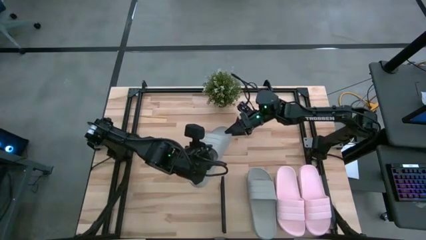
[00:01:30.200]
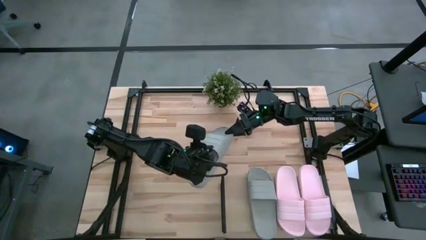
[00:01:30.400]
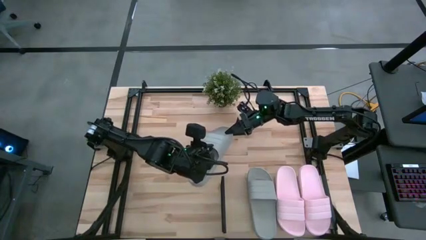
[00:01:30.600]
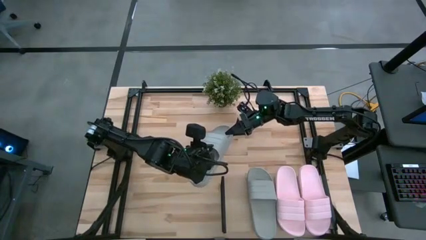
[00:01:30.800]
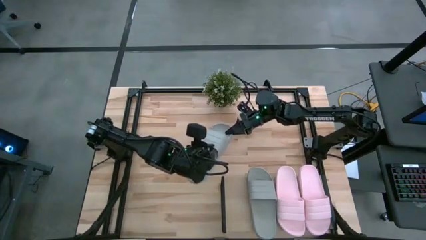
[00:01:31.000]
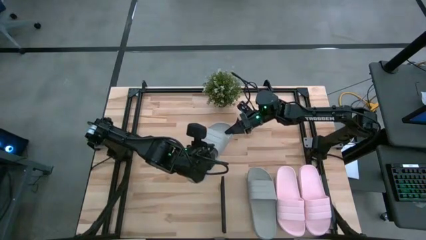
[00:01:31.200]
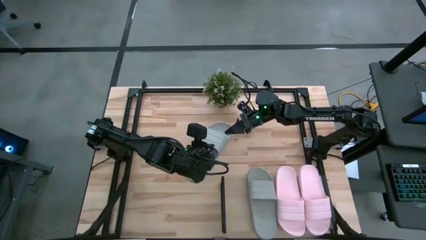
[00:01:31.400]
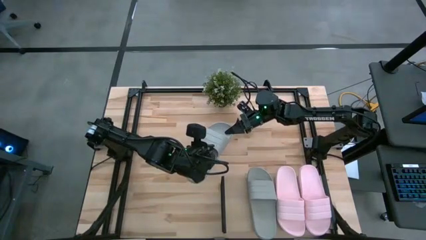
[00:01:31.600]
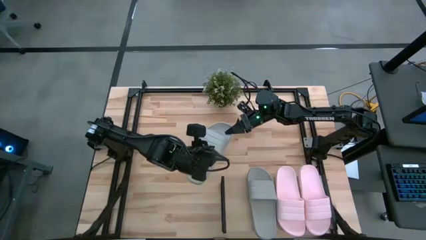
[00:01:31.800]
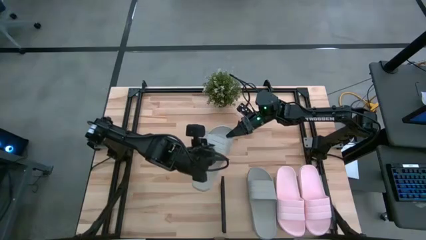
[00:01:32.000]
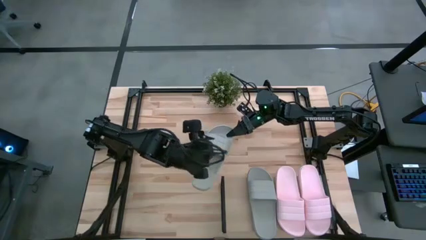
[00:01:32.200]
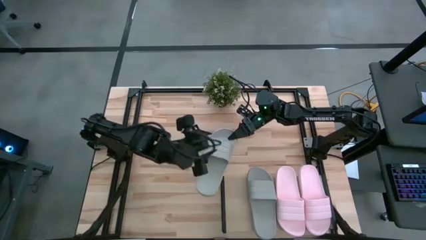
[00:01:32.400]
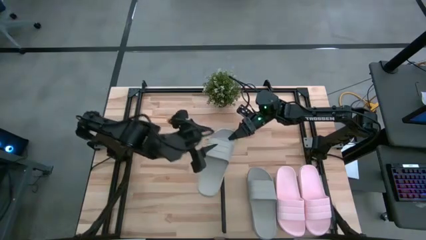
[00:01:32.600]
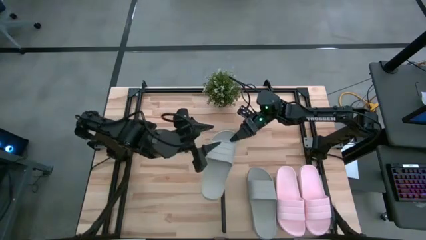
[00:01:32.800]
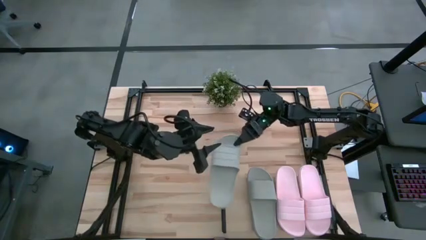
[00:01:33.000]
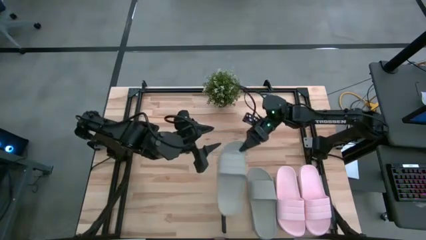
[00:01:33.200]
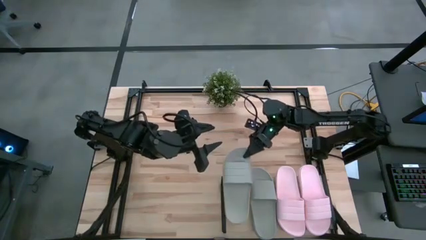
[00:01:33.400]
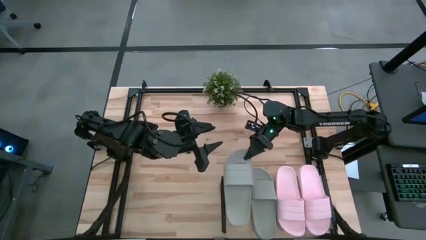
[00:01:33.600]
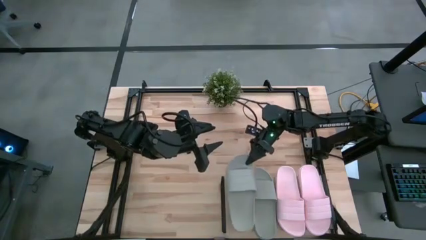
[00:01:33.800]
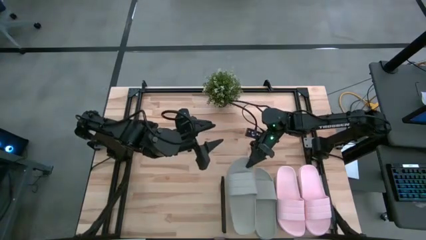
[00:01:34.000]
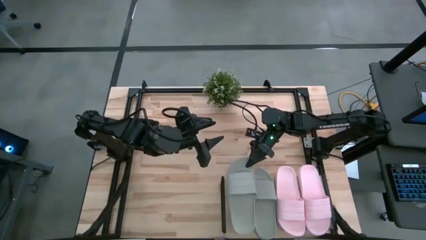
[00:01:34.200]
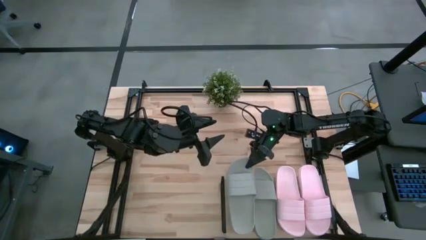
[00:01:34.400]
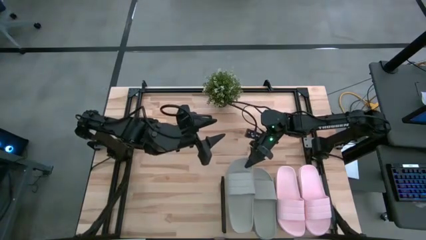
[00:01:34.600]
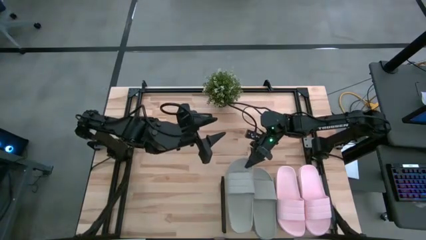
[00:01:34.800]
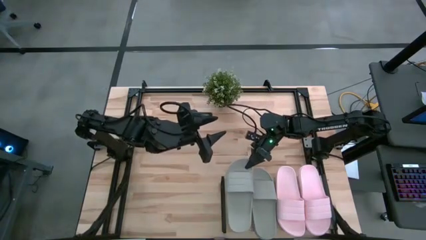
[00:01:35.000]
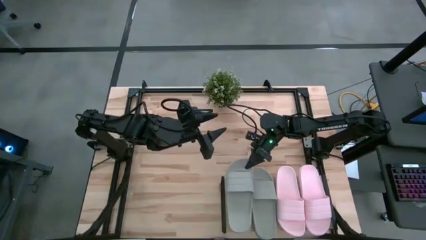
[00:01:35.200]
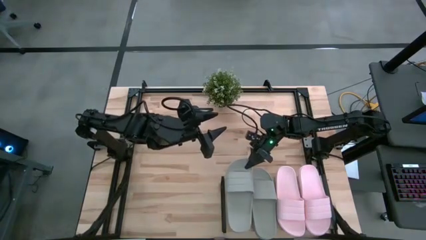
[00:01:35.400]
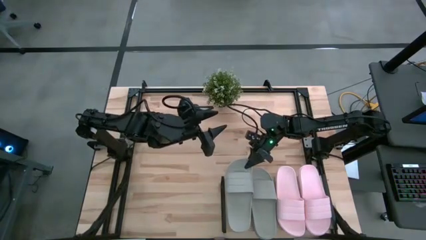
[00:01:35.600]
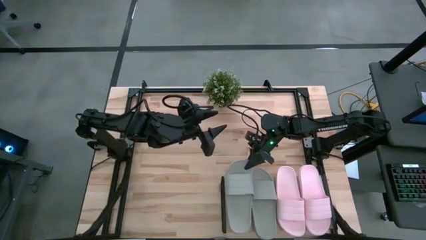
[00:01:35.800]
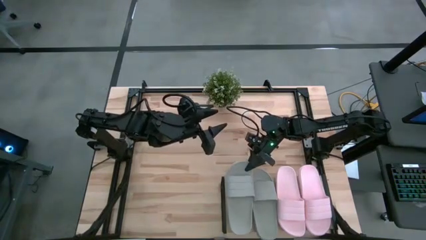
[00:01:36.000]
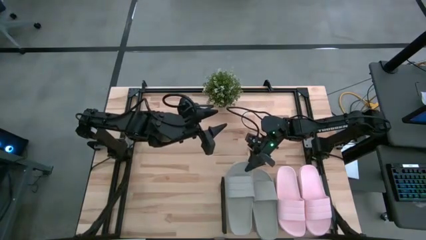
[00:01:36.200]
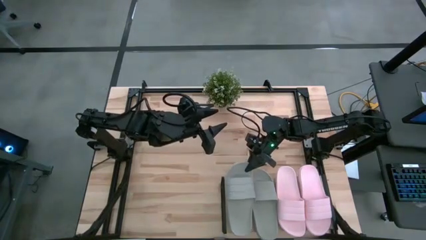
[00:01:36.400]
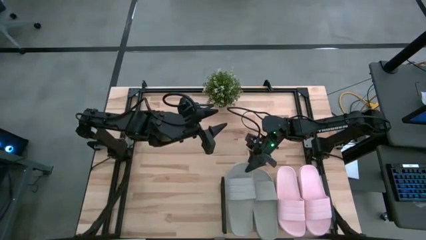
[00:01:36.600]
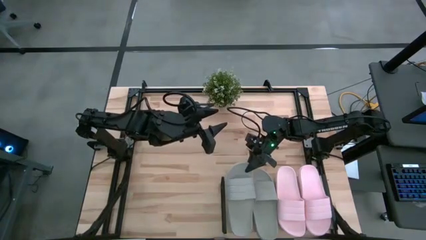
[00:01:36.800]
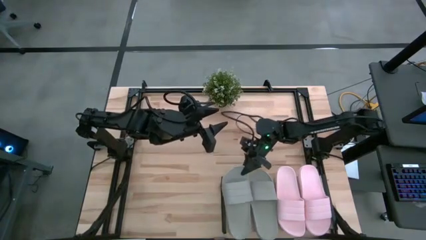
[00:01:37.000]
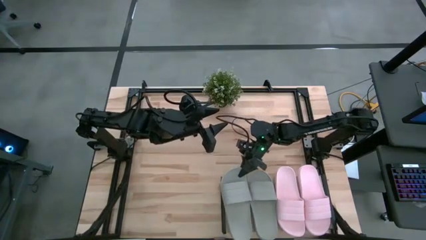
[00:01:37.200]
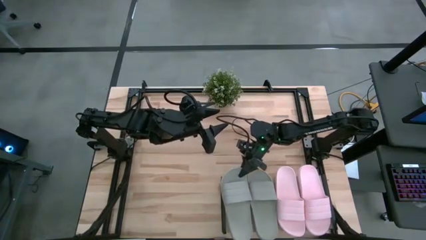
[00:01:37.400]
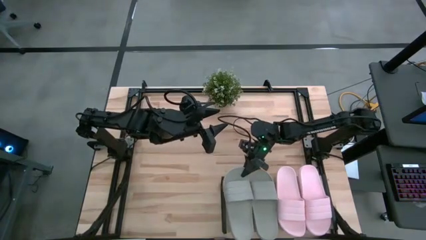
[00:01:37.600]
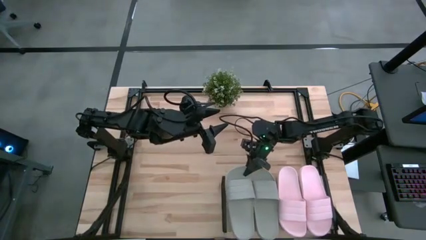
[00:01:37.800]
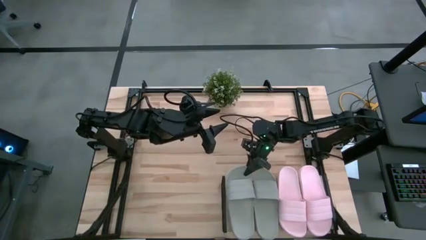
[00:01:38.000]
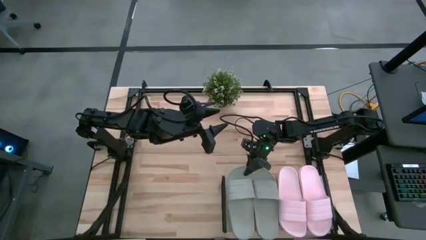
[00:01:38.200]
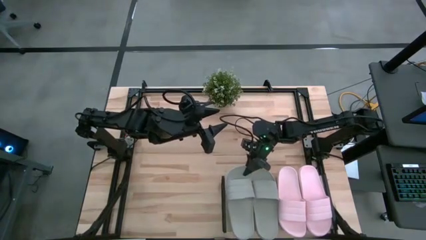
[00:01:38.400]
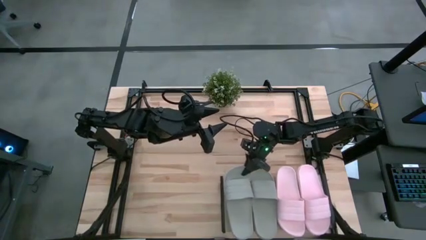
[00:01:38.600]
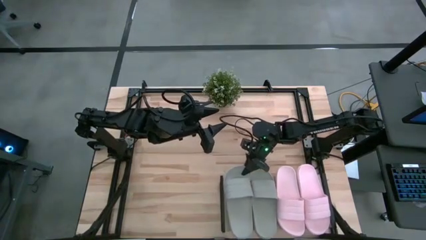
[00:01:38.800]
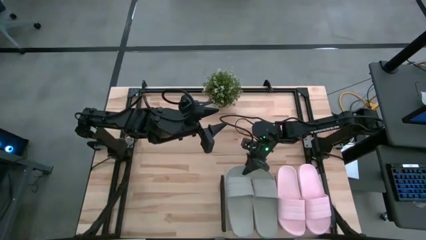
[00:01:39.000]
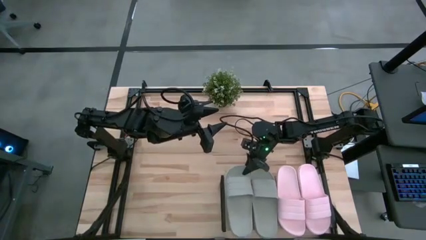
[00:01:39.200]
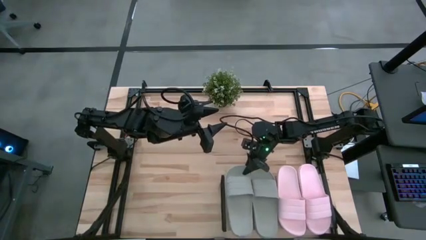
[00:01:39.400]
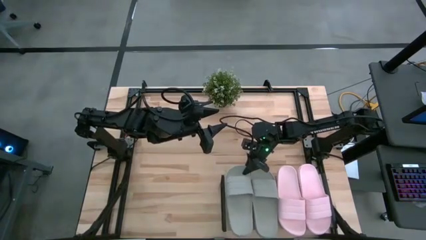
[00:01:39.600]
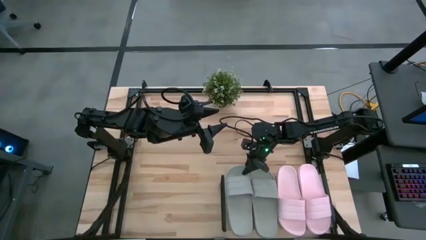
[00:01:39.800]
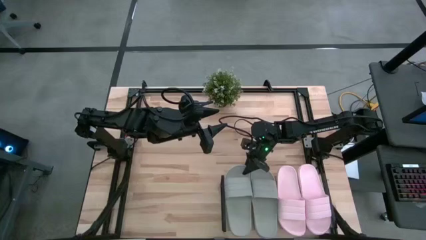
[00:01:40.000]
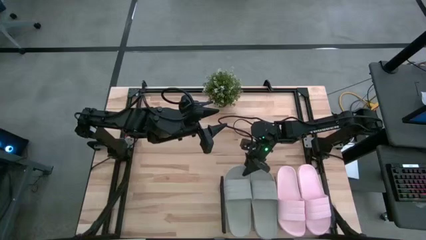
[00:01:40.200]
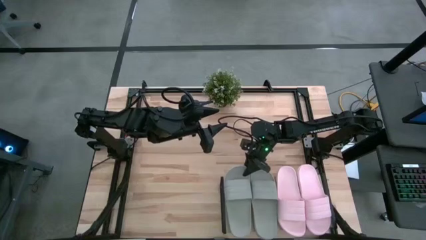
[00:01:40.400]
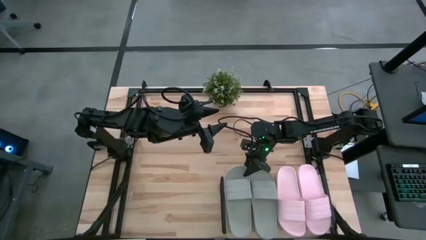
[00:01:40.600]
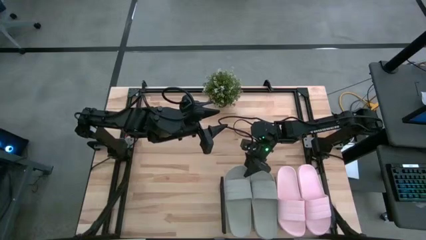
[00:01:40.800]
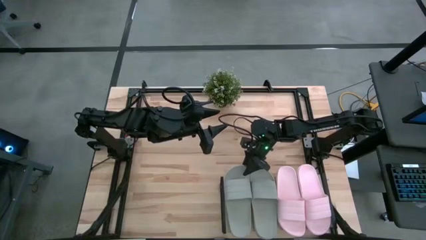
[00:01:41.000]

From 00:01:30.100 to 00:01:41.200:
Task: Pick and place slides into the shelf
Put the gray slide on the shelf

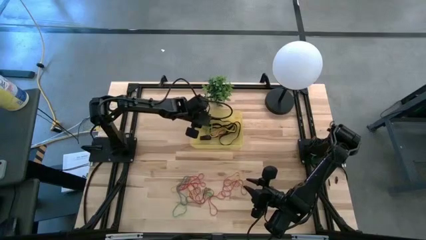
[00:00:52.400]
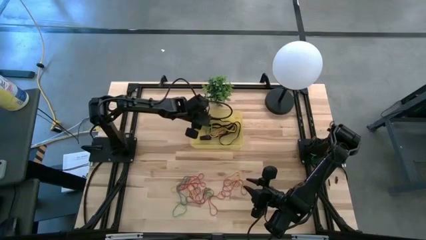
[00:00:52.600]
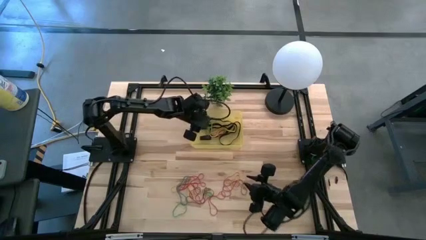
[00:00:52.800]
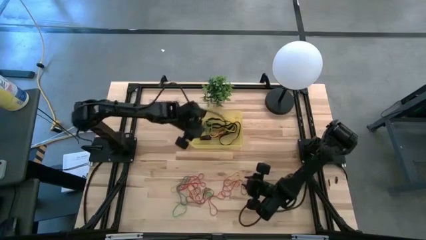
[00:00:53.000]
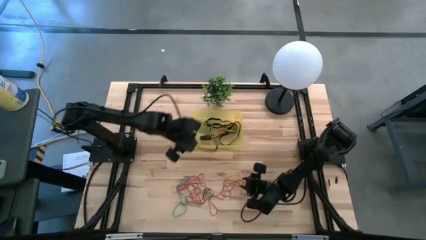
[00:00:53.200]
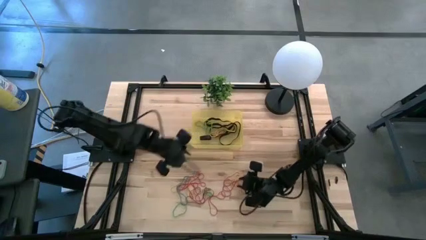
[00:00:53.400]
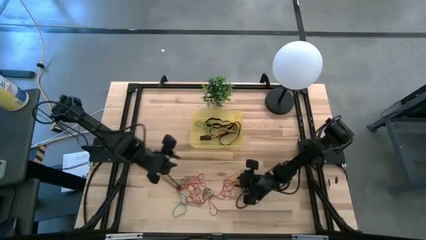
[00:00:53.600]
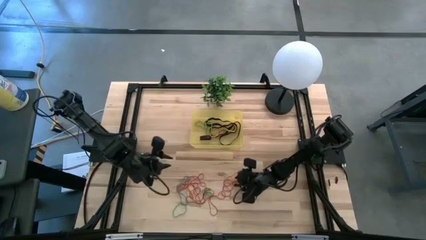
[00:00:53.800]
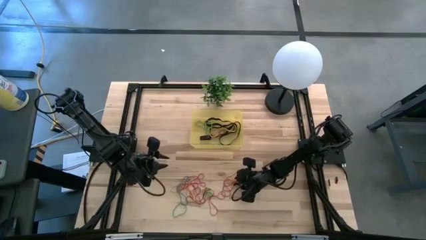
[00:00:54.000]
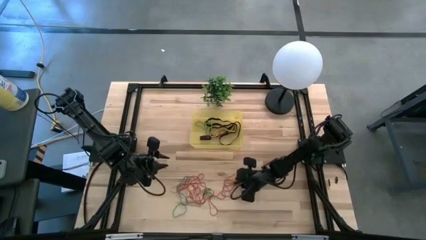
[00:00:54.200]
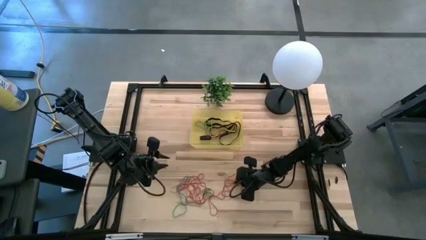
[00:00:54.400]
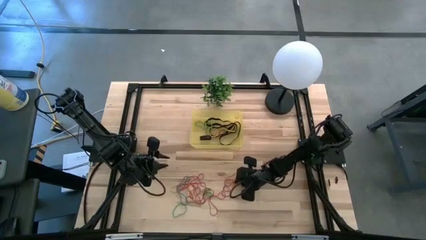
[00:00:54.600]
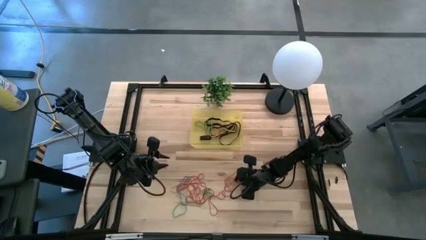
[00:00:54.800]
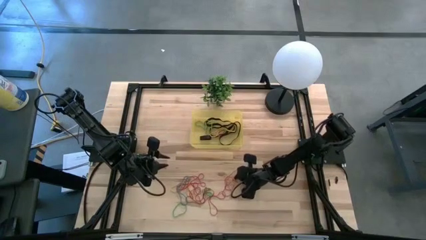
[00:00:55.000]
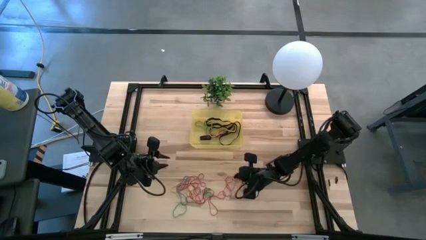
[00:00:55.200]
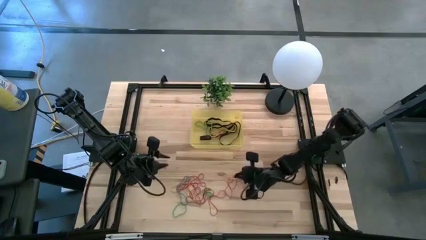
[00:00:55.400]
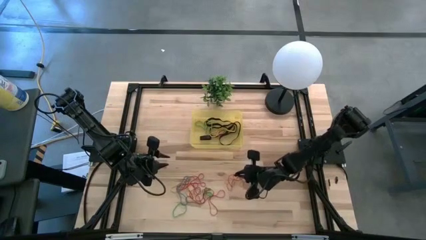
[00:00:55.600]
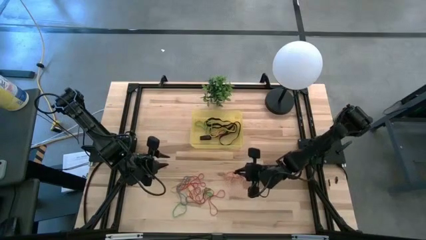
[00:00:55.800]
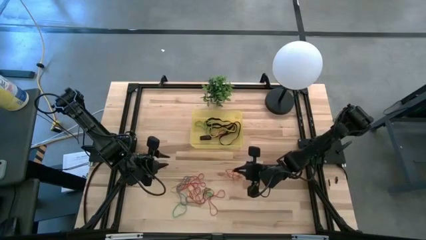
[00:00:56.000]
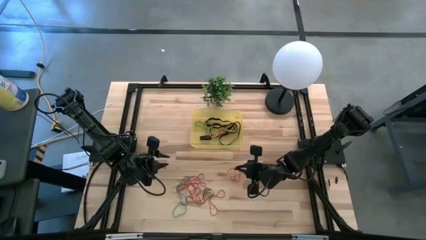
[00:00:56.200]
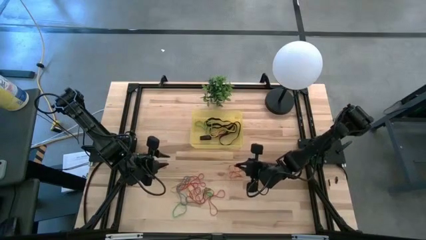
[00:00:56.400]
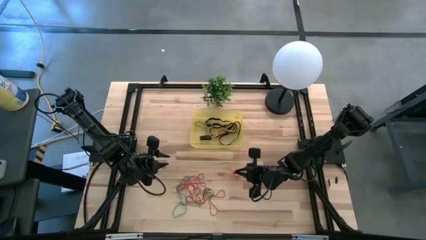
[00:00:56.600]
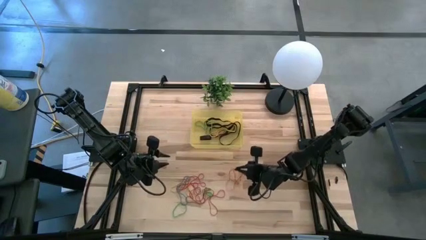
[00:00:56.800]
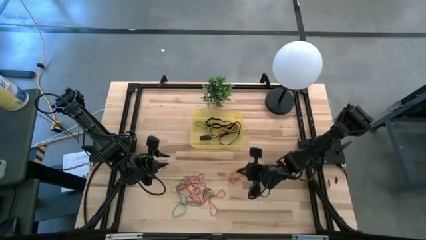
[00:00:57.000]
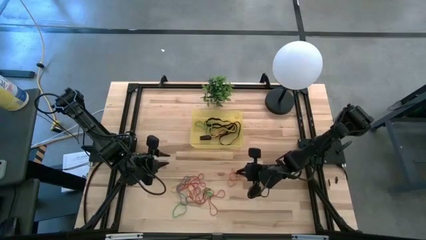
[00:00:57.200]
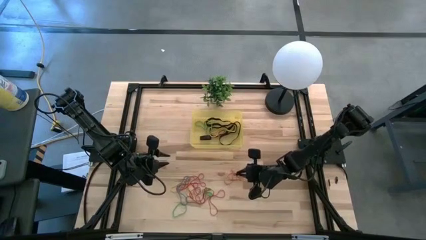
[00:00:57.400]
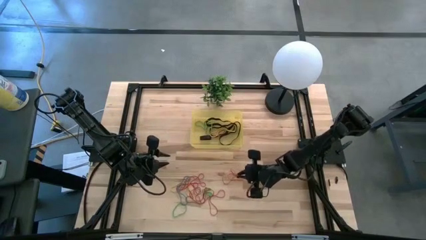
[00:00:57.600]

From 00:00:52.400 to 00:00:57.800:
Task: Pick and place rubber bands into bin
Put the red rubber band into the yellow bin
